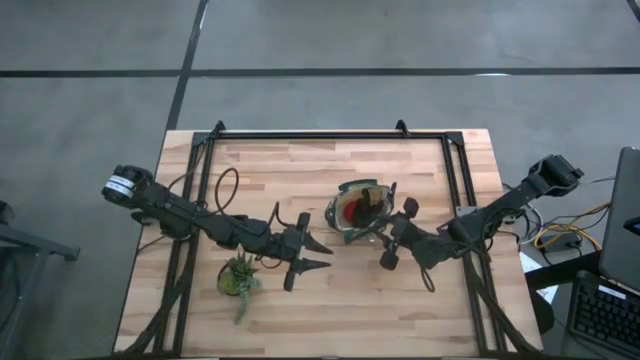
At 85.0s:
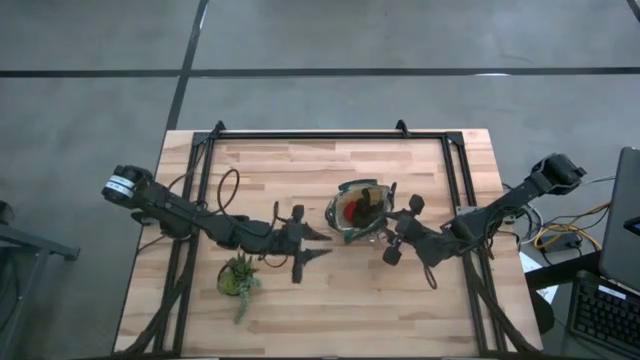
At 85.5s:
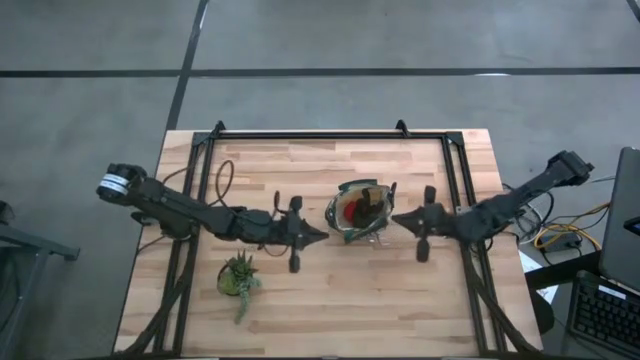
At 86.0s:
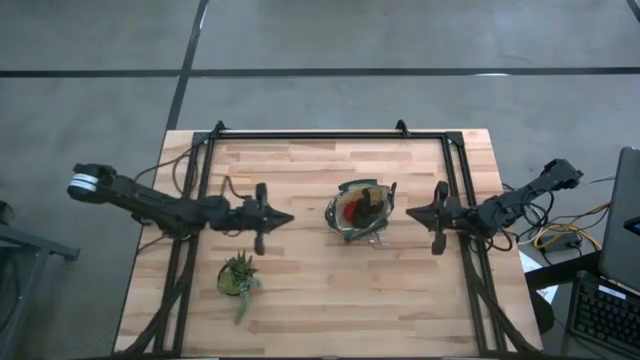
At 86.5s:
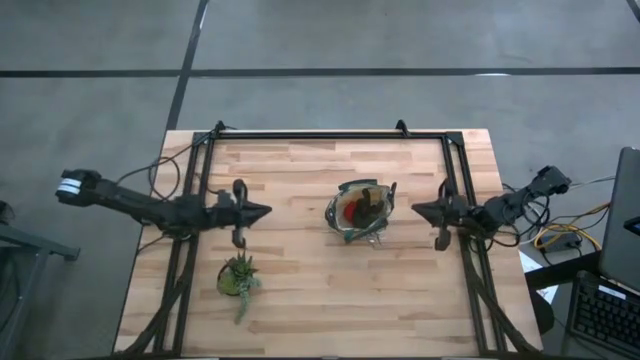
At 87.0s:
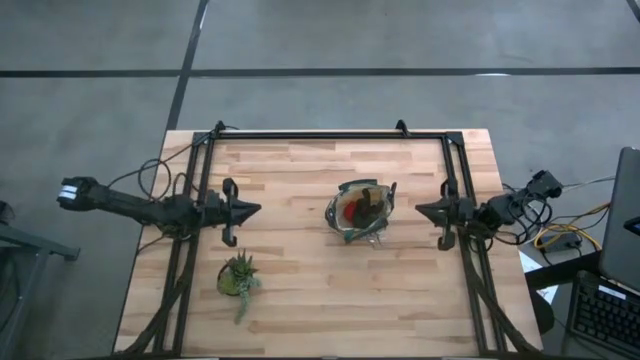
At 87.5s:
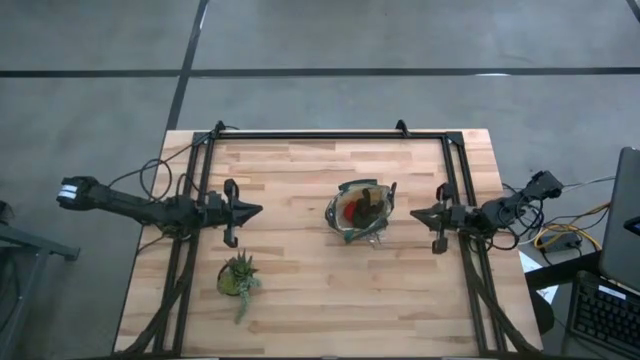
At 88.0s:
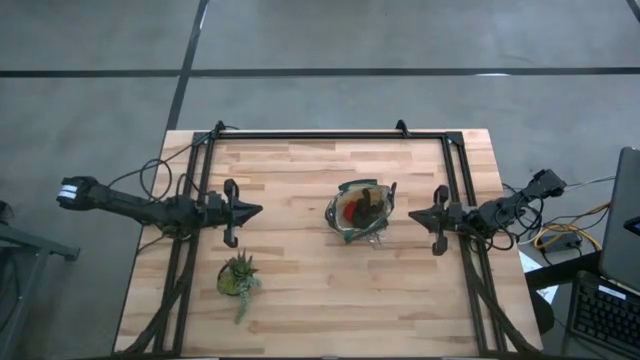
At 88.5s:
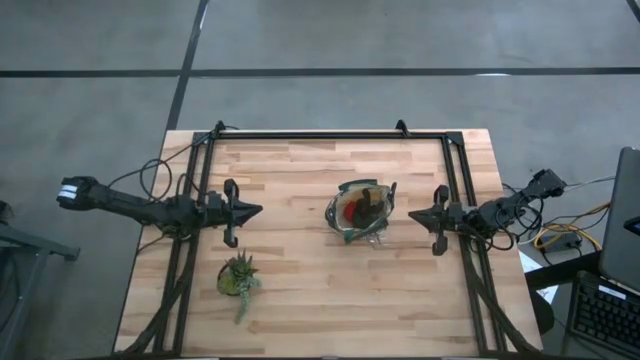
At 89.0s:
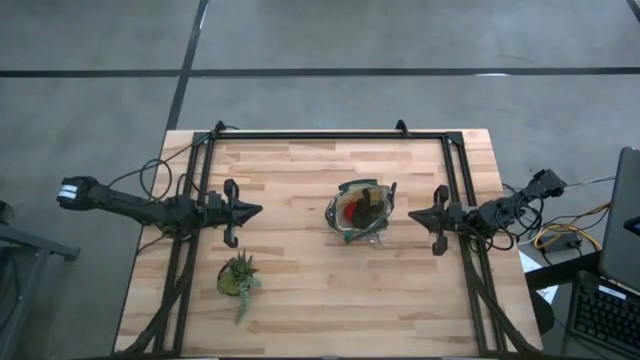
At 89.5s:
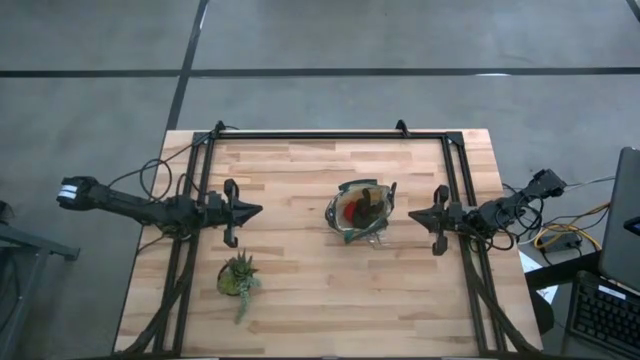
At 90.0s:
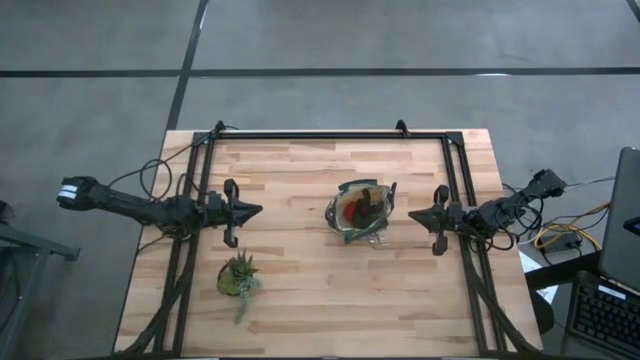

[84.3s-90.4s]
Task: Pick & Place Garden tools in Gardening bag
Return to Home Position

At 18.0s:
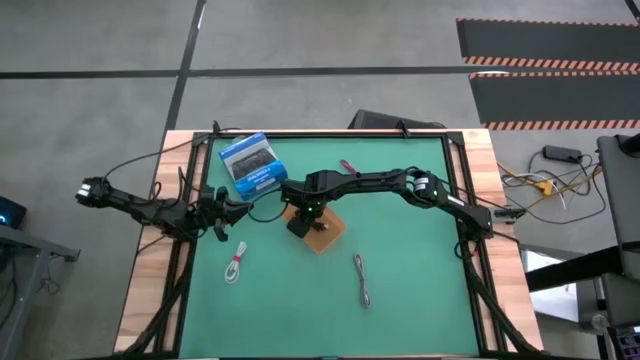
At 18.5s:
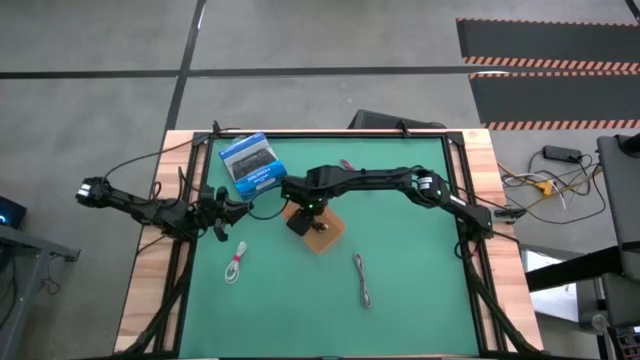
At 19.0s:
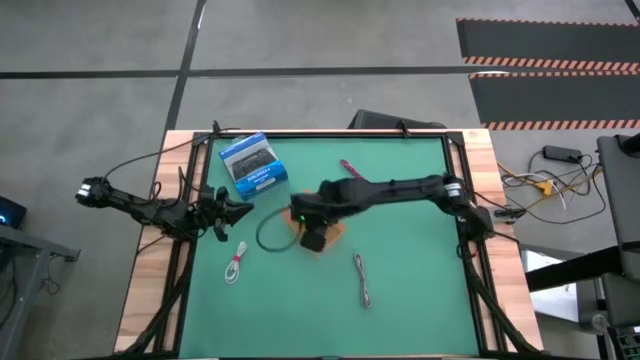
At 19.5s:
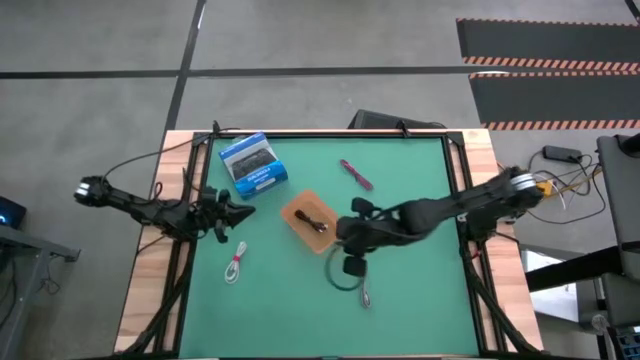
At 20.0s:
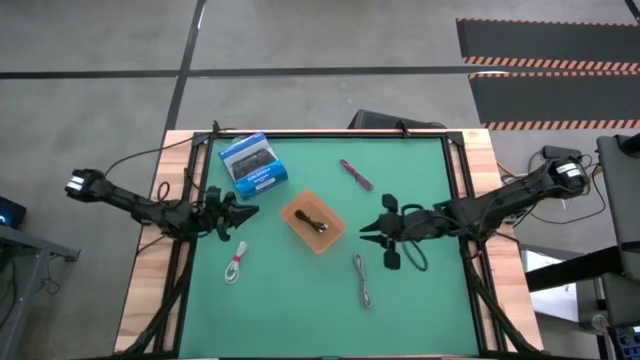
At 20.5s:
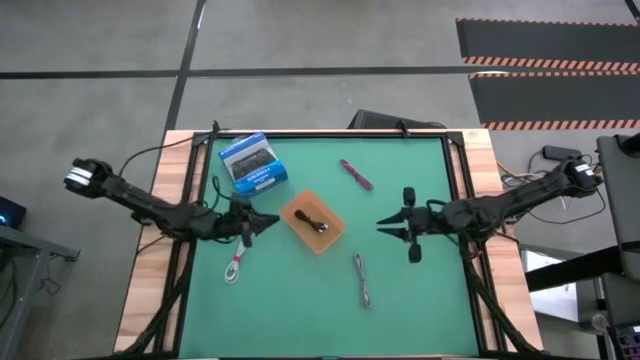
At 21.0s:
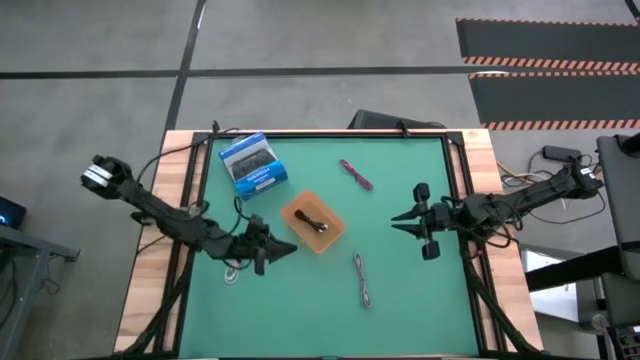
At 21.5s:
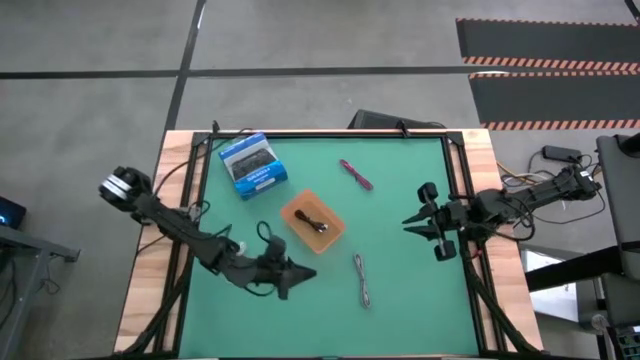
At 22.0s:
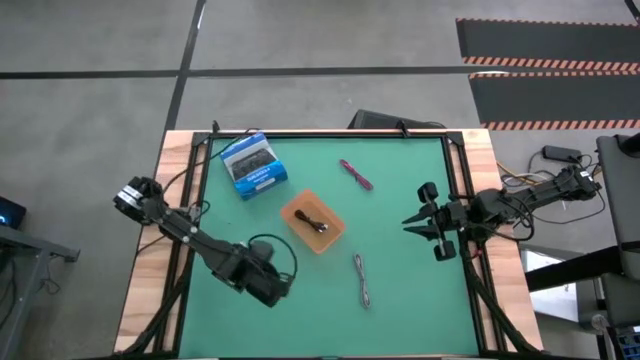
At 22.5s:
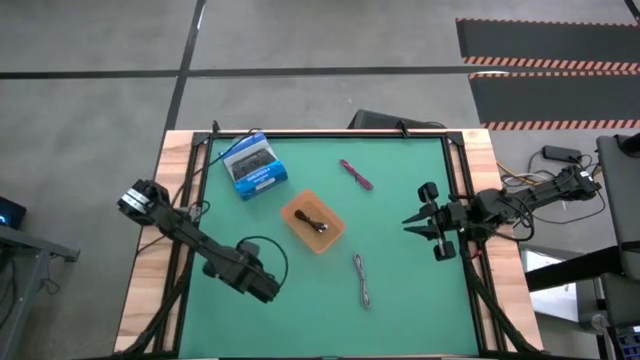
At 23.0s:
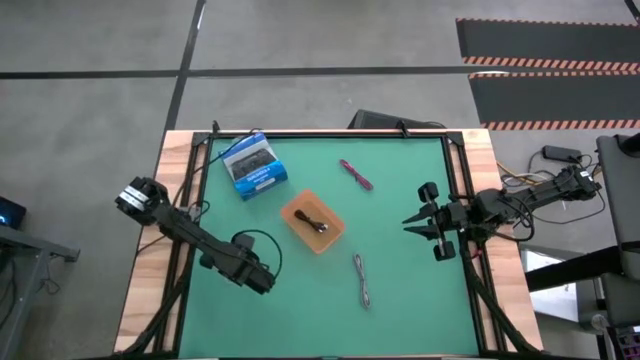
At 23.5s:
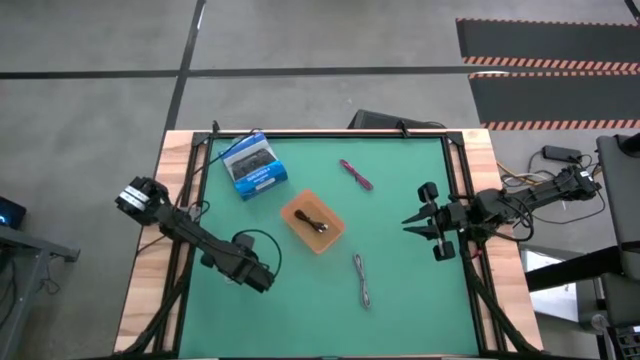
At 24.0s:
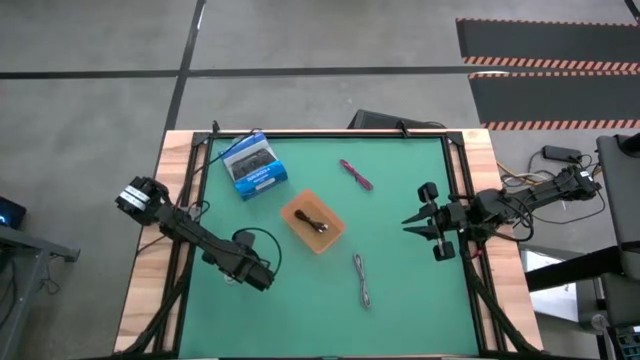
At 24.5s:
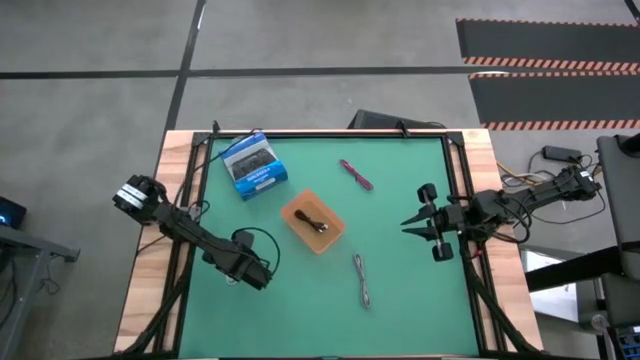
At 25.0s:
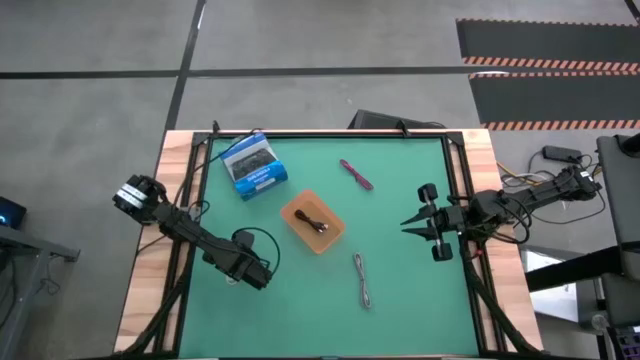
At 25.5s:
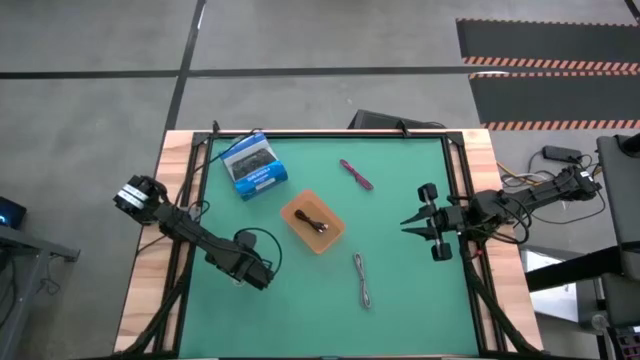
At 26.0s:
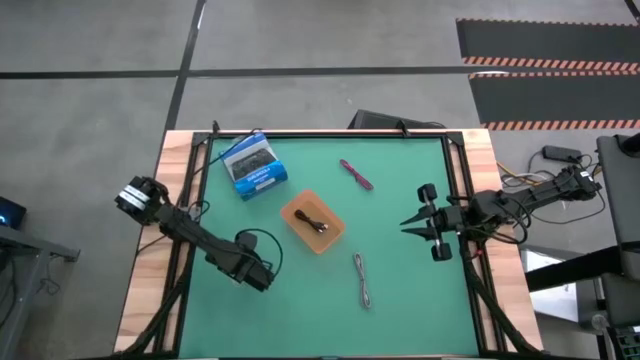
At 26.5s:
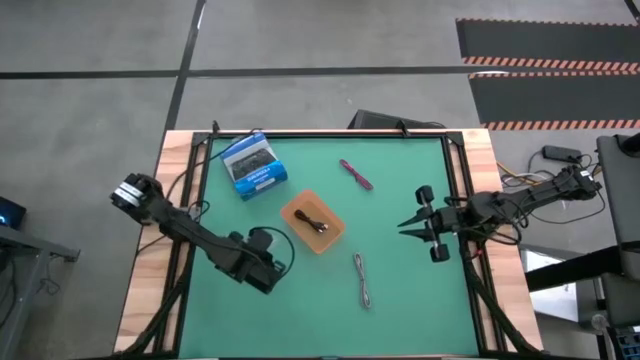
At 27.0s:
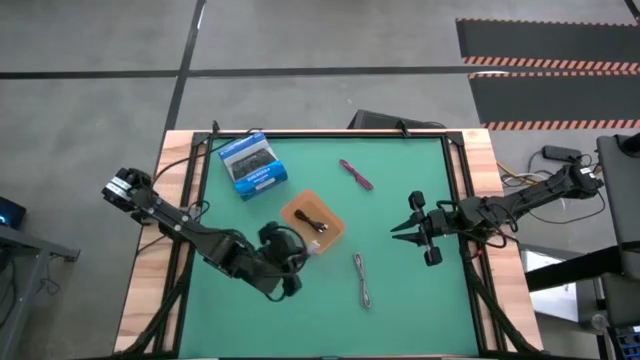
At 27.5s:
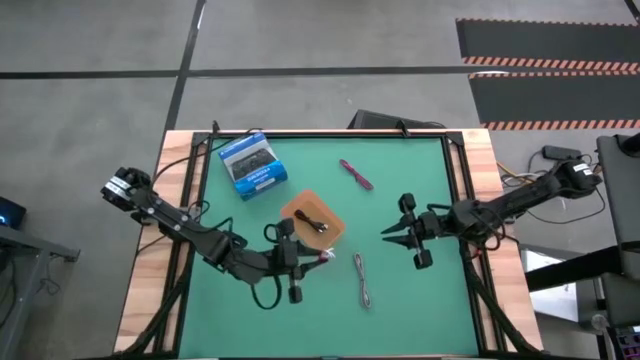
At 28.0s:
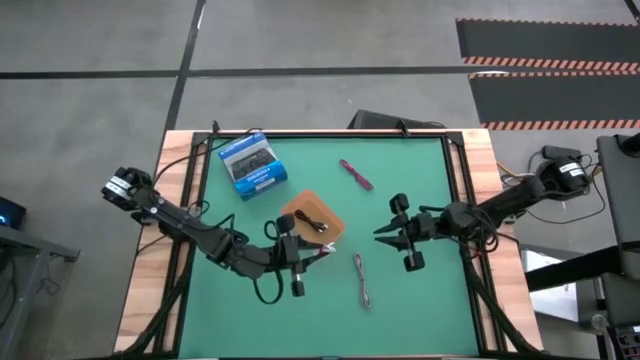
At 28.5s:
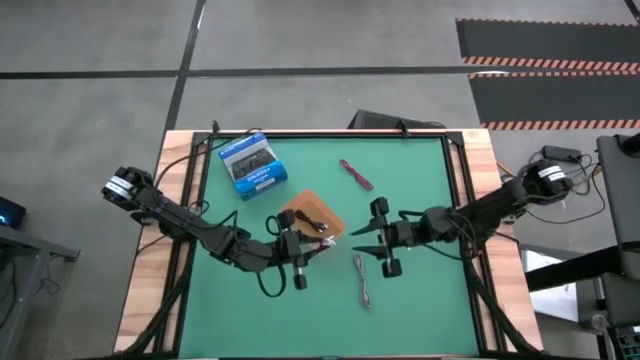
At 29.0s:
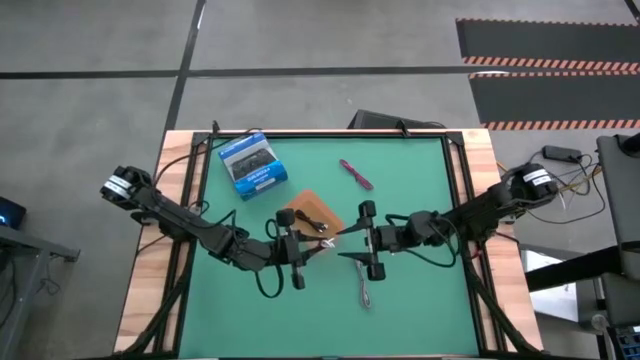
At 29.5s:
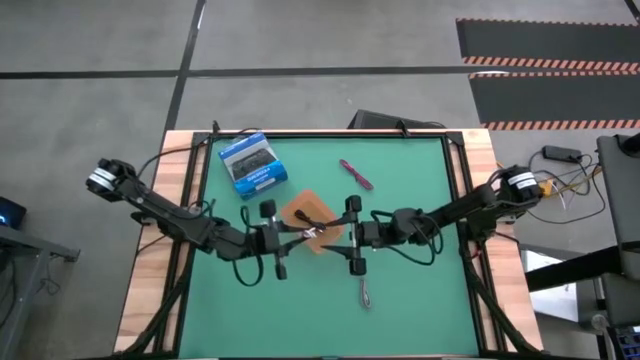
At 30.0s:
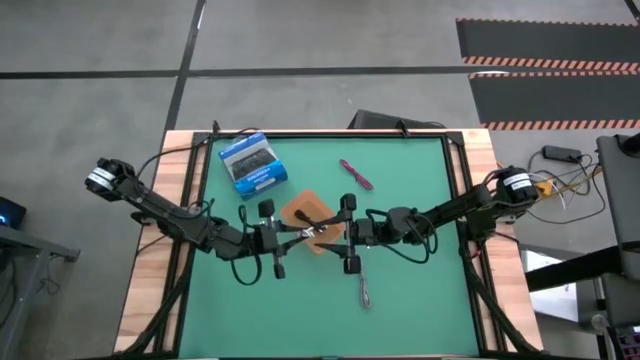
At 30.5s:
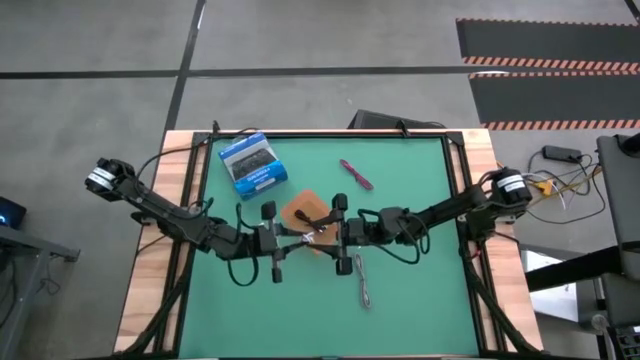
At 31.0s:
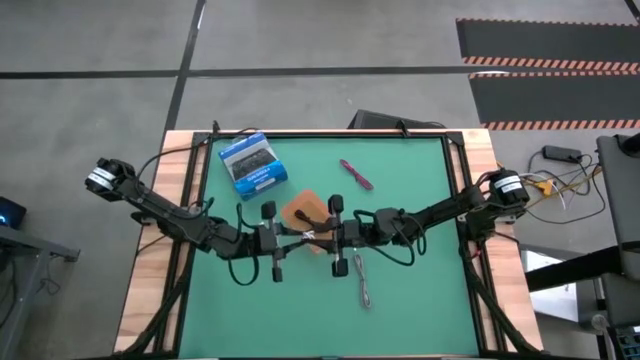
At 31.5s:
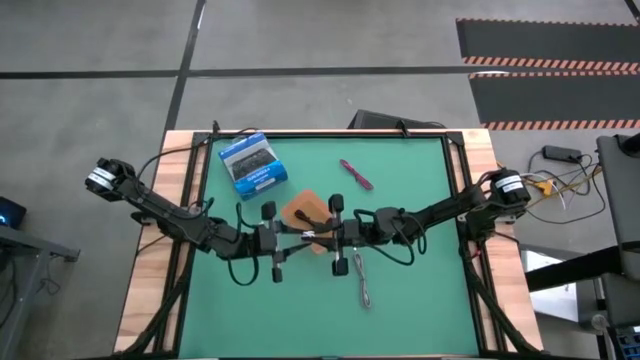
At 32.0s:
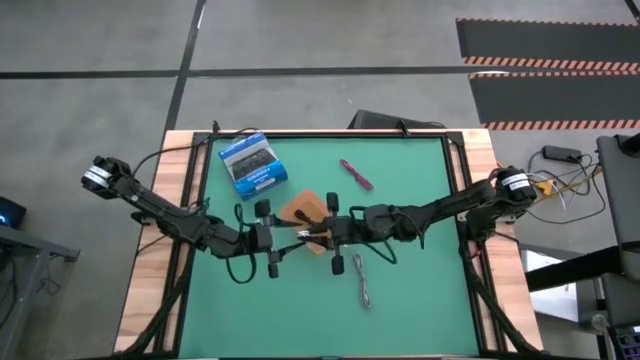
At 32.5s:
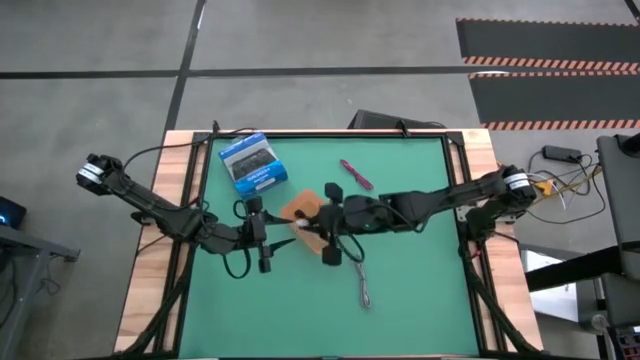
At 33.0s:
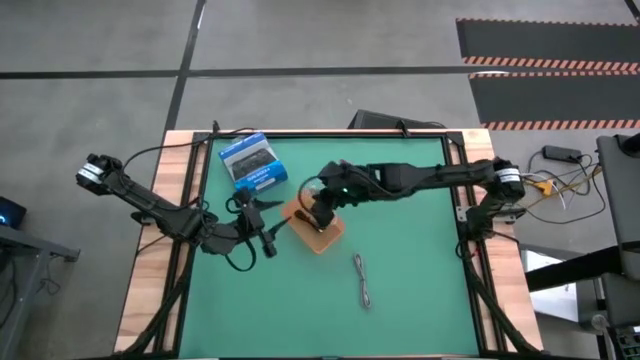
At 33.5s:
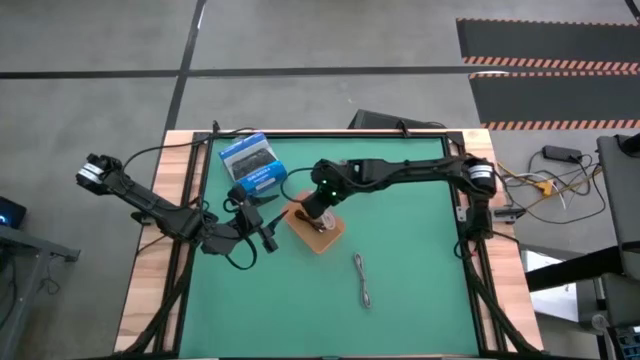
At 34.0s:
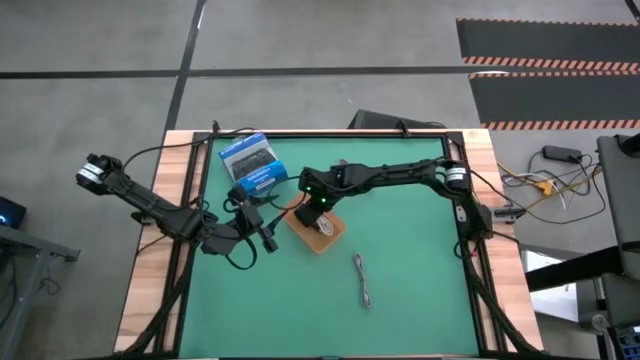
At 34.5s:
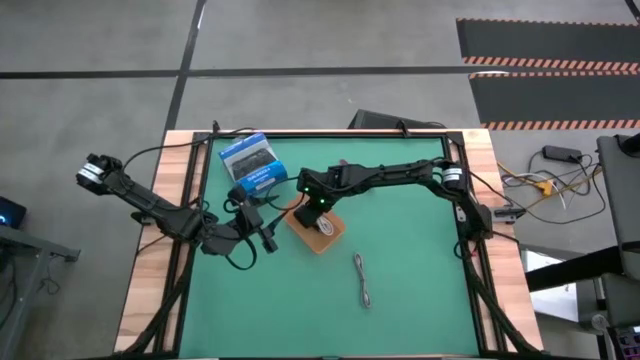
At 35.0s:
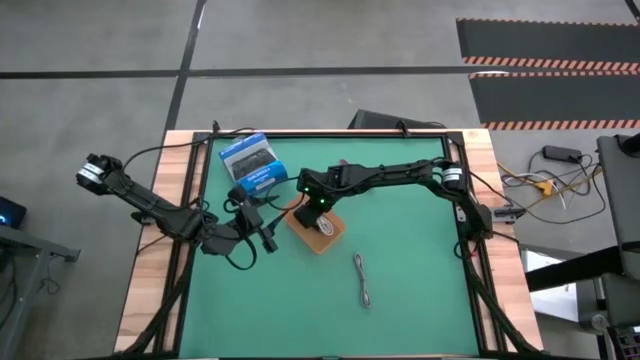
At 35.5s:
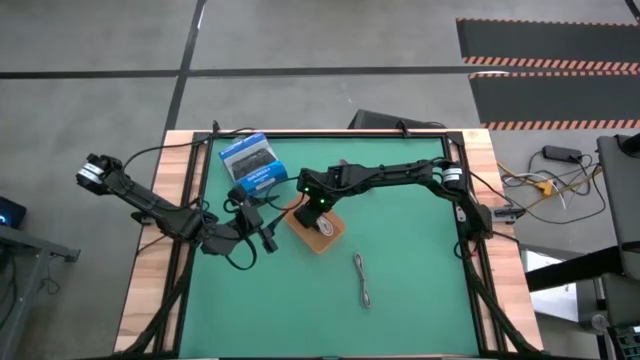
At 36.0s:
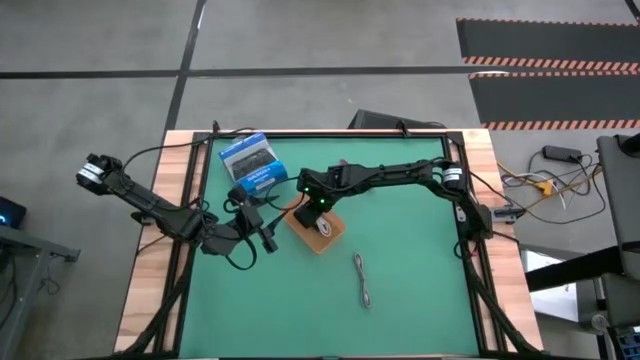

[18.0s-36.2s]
Task: Pick and place USB-C Cables
Put the white charger cable into the orange bin
